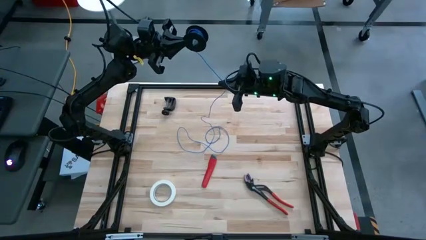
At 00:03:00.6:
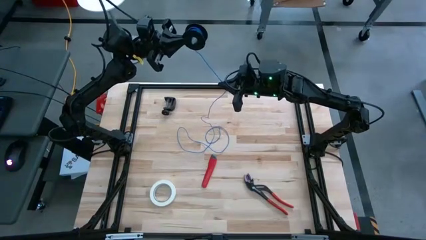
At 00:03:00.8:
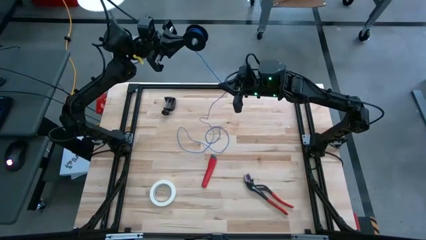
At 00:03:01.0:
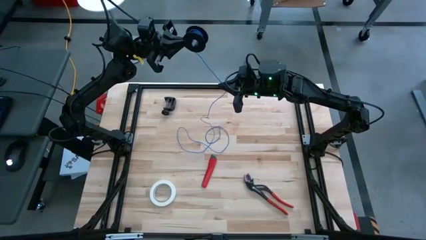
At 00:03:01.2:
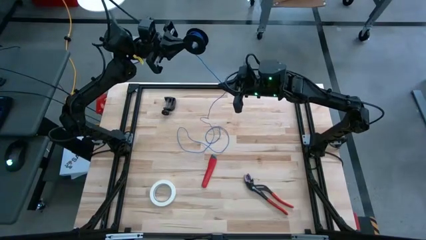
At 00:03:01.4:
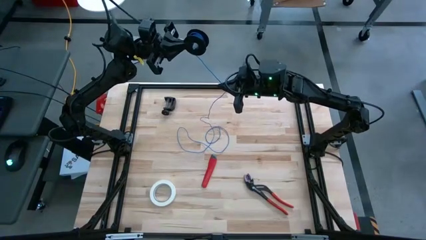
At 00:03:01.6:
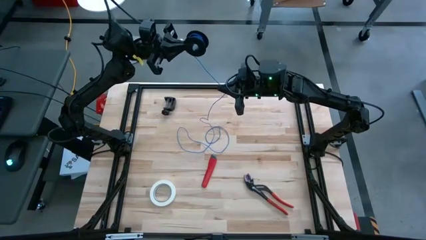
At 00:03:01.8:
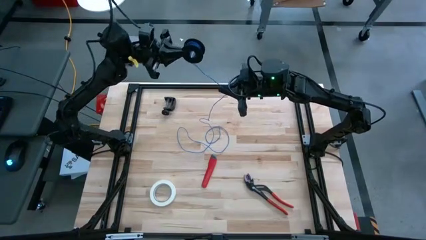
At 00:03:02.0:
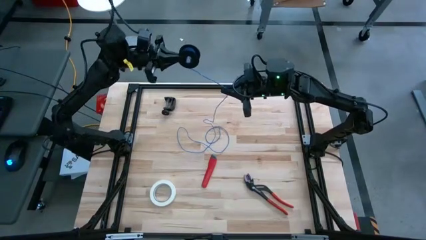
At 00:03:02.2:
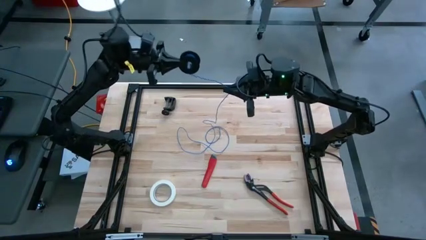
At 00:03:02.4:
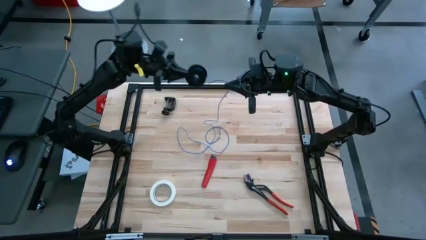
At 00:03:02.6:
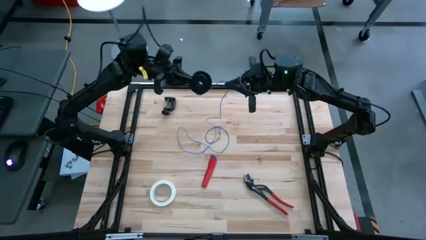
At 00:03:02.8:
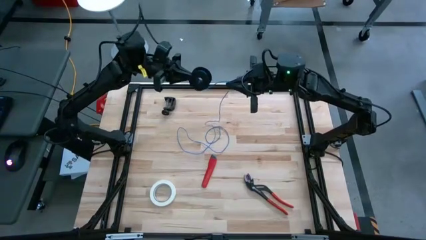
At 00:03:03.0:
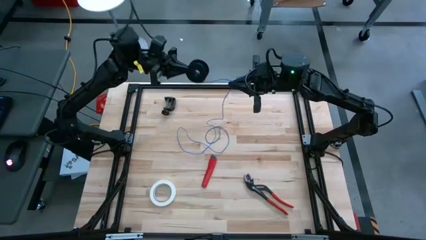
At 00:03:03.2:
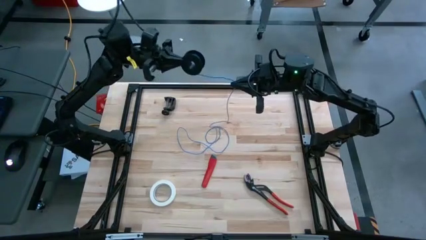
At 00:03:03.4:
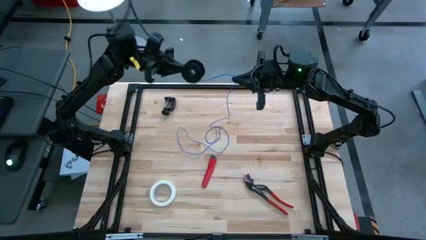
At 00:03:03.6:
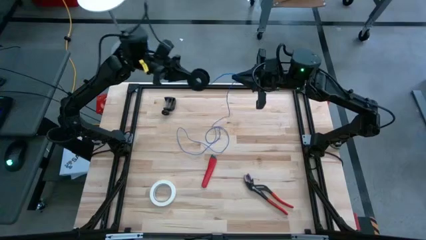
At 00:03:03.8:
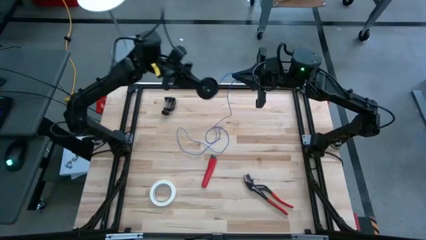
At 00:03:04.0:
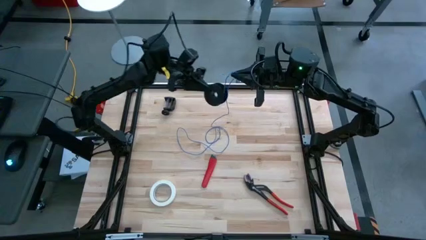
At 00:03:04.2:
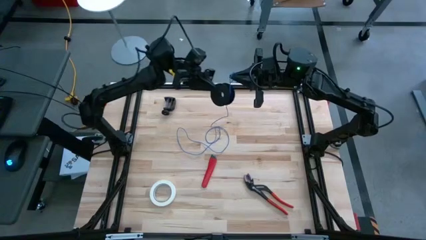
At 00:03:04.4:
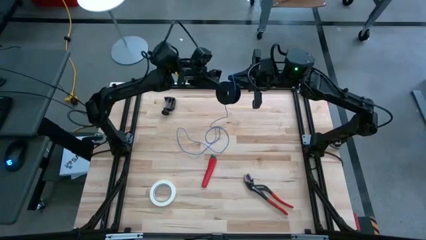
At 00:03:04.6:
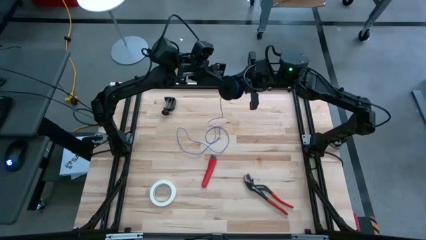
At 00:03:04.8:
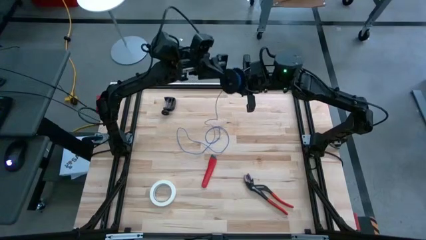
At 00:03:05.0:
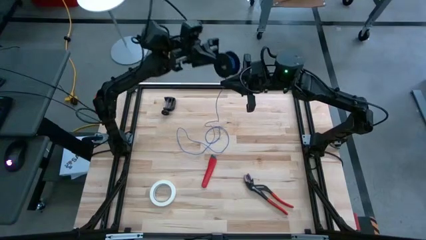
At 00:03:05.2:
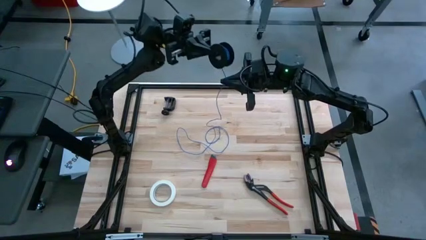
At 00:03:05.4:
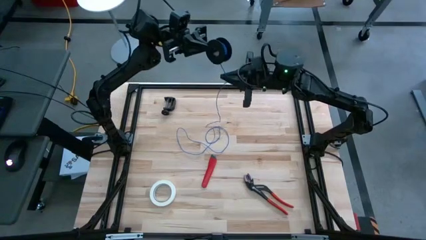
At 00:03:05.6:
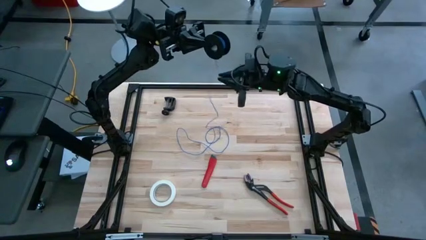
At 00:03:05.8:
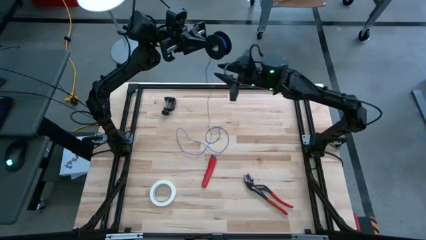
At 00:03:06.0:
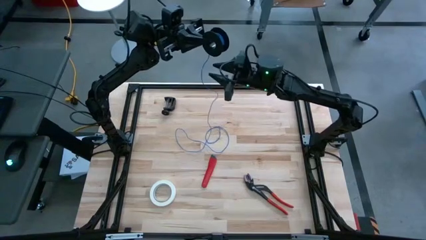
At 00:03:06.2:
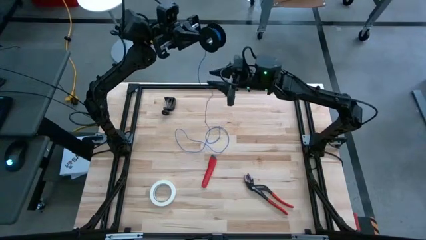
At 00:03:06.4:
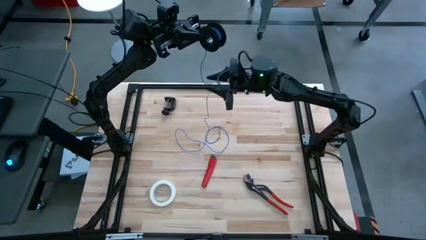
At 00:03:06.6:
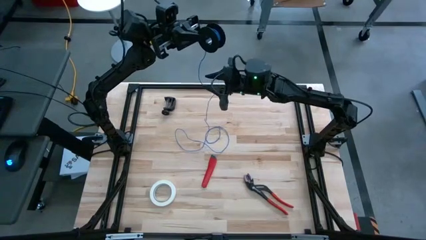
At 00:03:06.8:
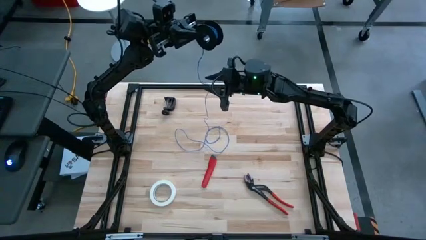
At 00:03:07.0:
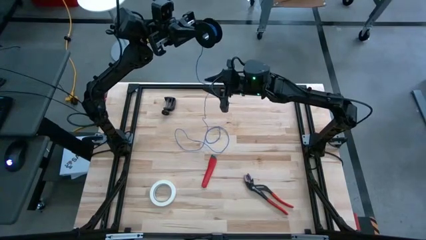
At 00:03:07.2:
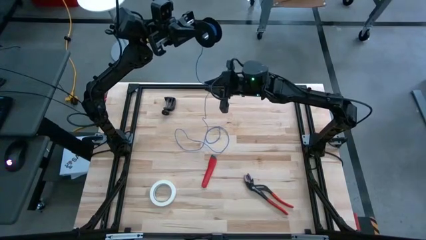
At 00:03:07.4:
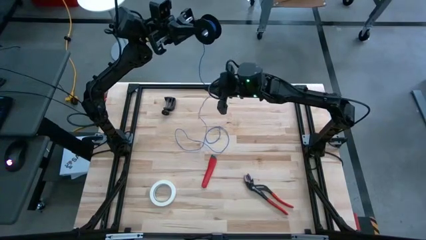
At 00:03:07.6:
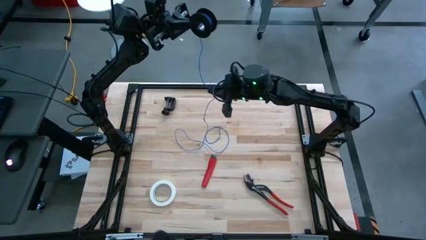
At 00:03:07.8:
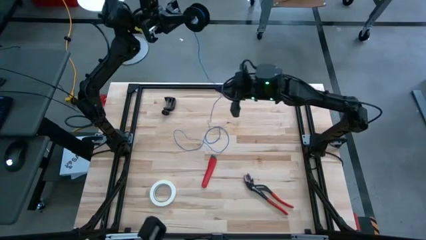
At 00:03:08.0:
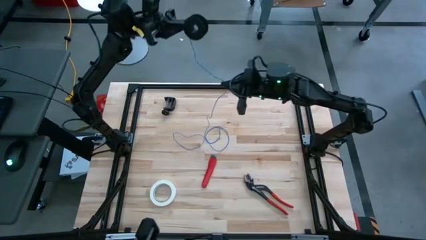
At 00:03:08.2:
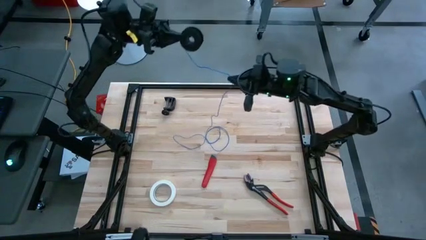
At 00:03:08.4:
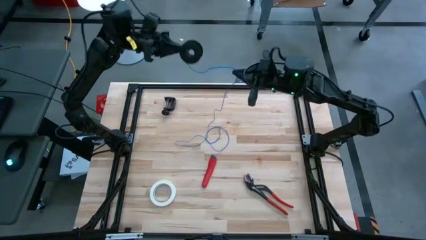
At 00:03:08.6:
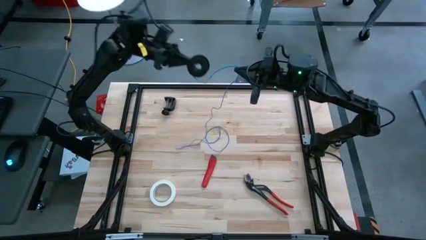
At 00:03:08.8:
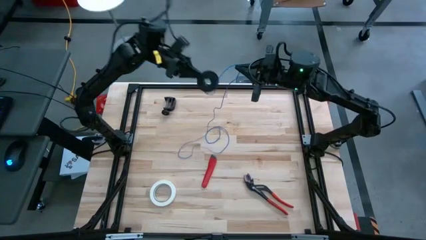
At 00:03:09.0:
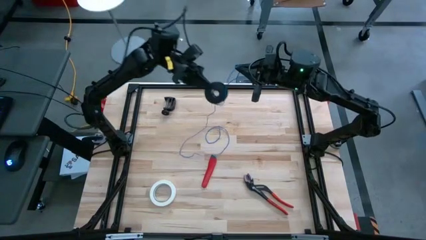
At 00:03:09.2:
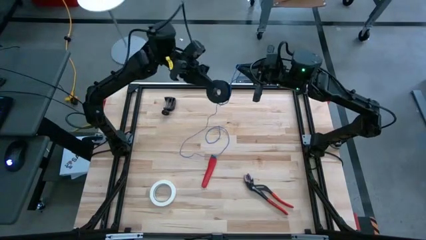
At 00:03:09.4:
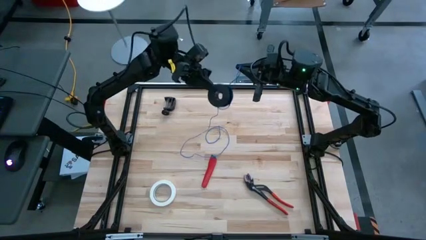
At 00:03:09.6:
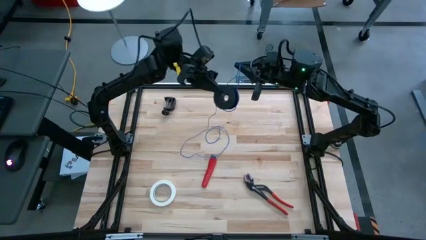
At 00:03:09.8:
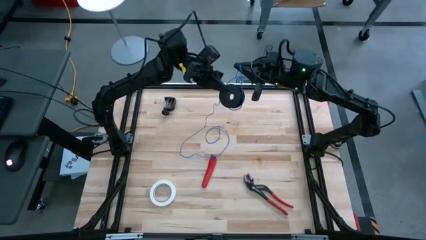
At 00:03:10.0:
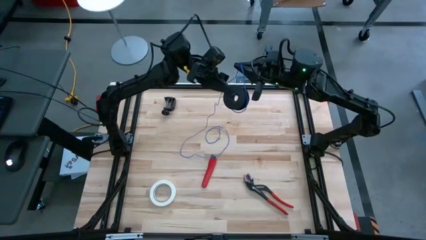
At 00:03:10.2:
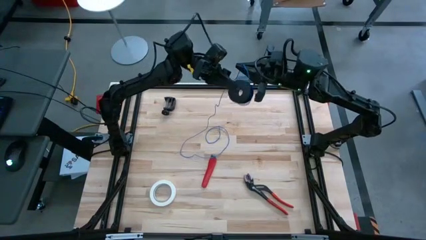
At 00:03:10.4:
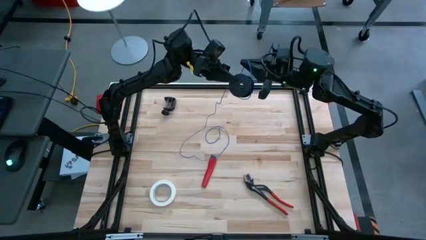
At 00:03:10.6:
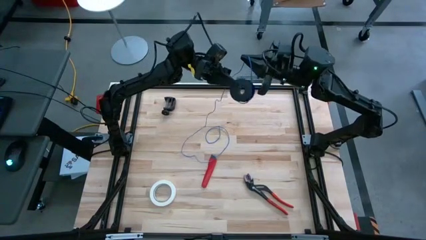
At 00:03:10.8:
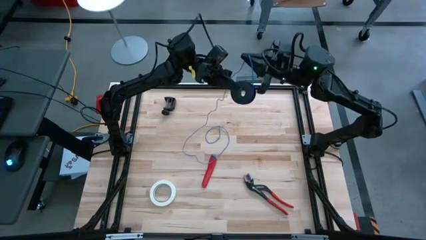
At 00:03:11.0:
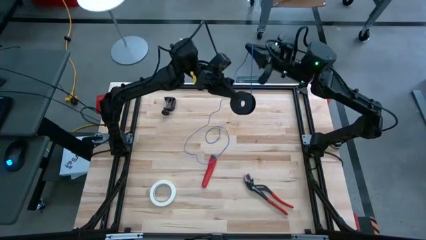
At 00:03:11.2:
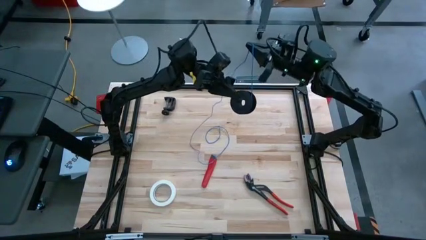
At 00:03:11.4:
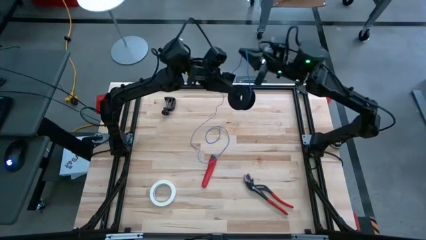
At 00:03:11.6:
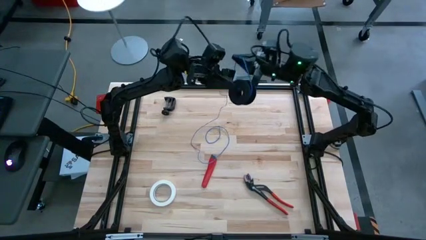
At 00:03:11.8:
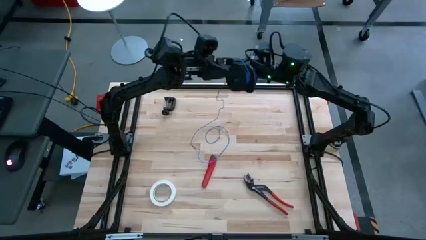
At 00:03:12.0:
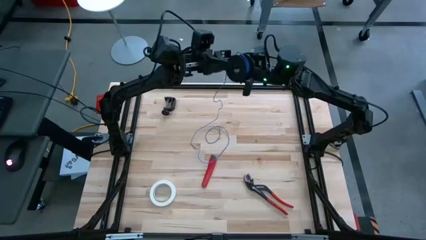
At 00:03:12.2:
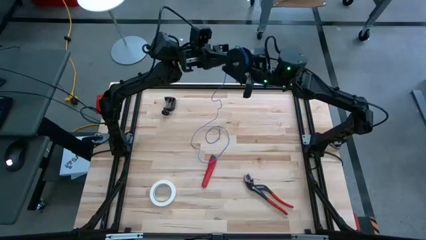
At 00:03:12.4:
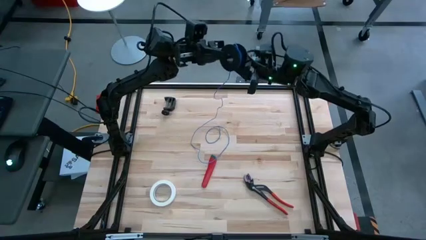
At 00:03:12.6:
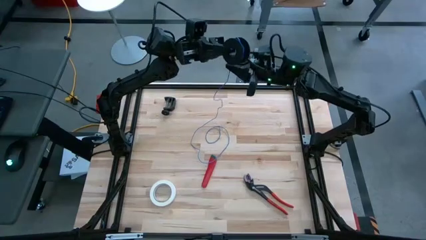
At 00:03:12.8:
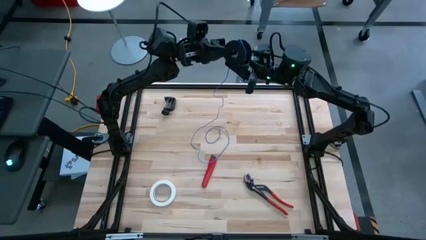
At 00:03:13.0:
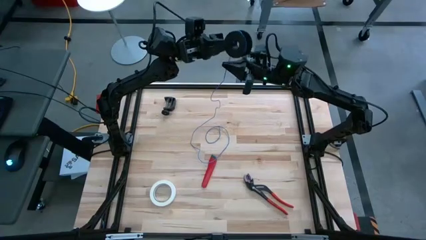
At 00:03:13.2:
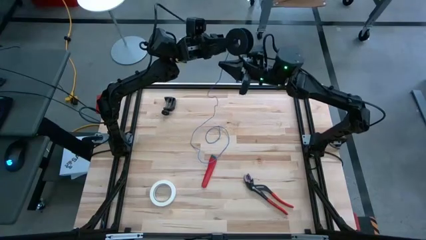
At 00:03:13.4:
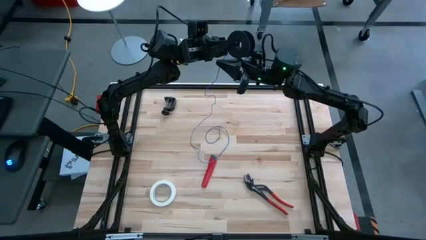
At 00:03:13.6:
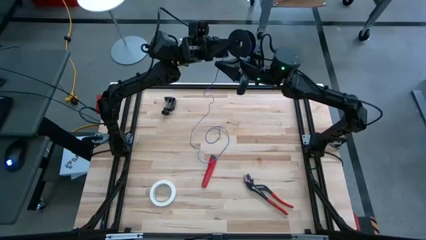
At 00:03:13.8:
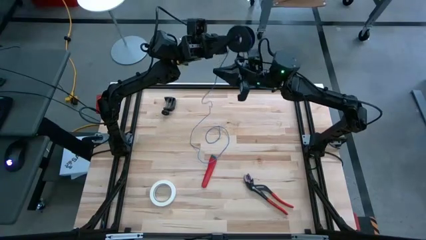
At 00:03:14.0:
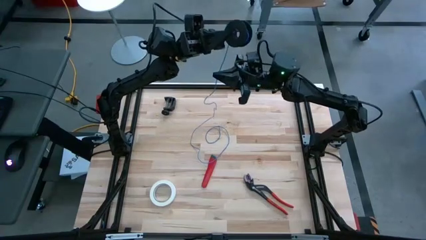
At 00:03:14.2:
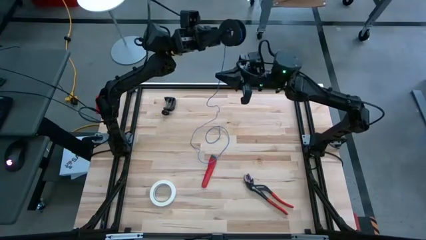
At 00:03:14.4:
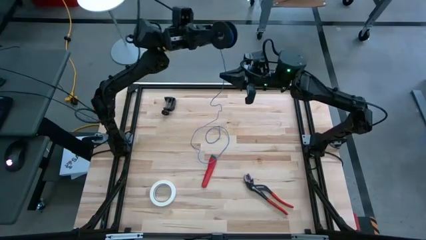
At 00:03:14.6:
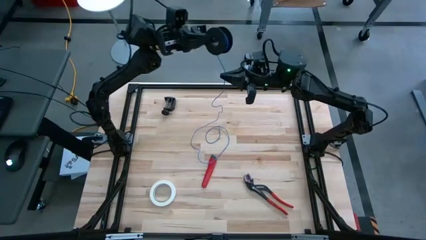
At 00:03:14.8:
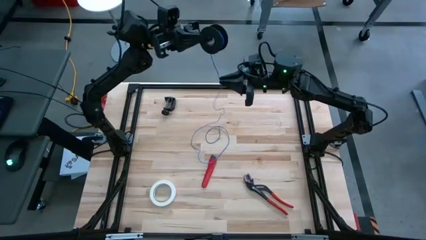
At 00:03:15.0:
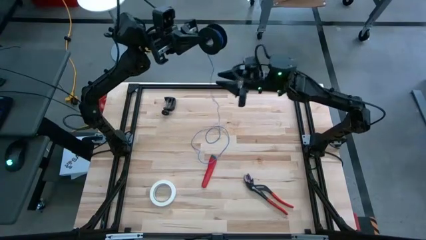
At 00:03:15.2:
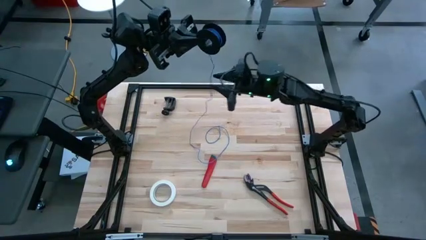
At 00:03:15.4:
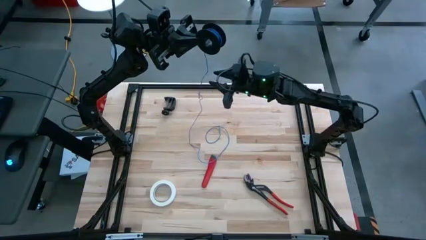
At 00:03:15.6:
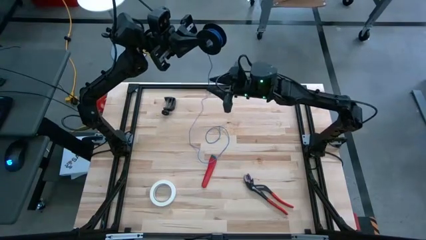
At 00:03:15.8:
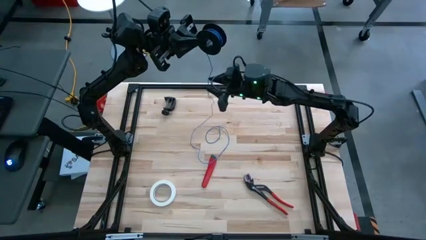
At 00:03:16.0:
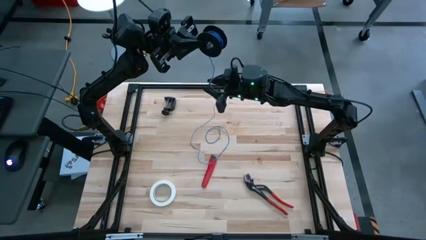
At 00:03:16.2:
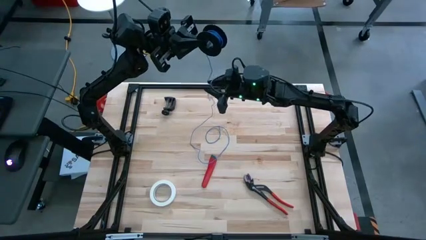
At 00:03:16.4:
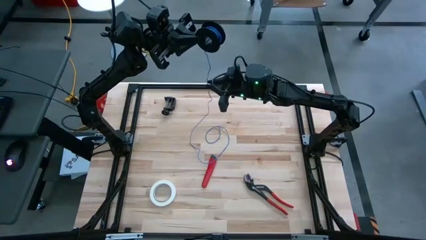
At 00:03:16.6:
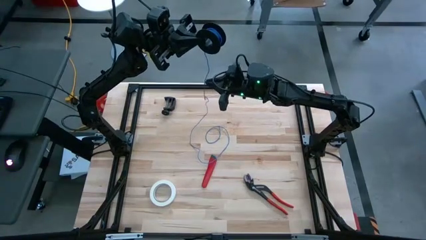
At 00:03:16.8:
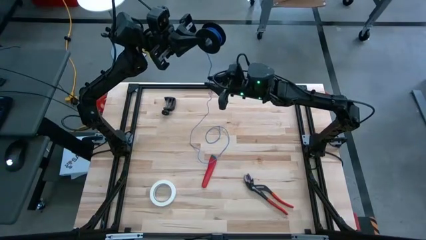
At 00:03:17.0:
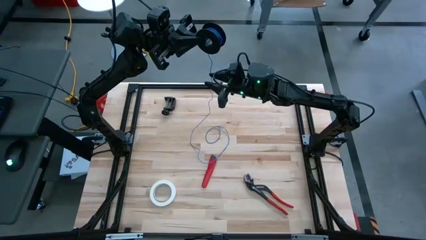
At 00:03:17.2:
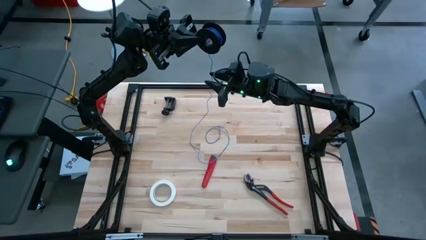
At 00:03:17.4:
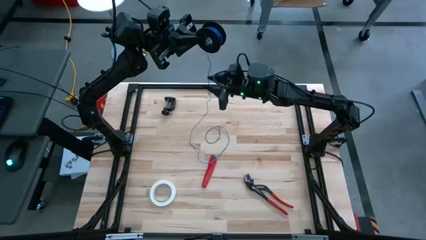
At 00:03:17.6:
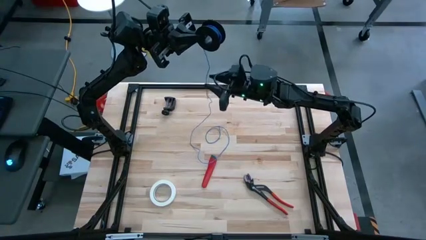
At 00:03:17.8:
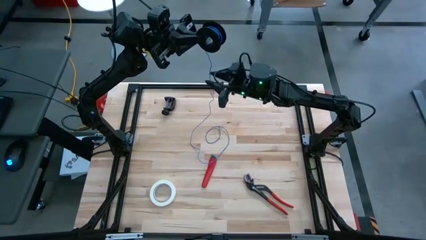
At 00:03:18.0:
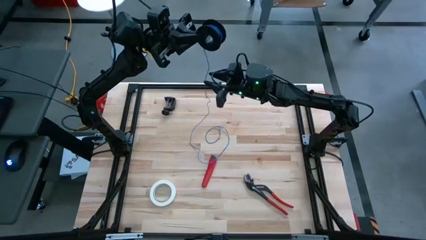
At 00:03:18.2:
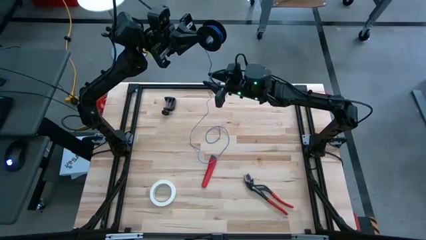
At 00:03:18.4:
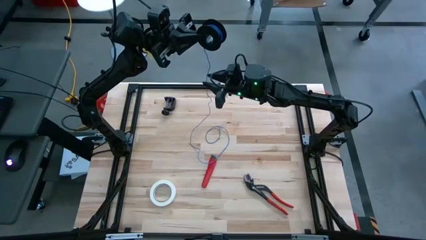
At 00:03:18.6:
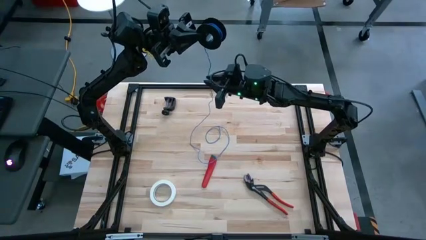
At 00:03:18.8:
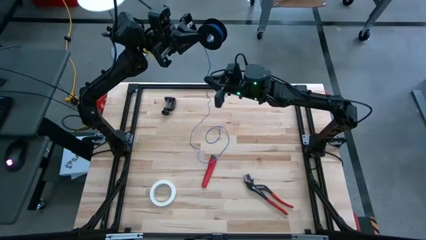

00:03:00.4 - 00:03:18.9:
Task: Coil cords
Coil the blue wire cable onto the black spool
